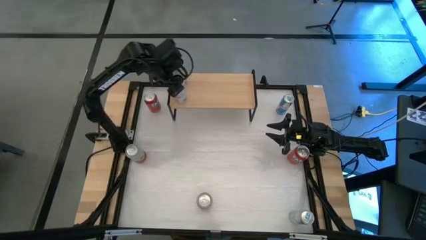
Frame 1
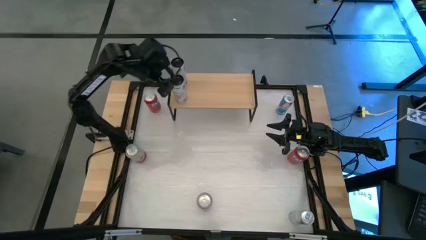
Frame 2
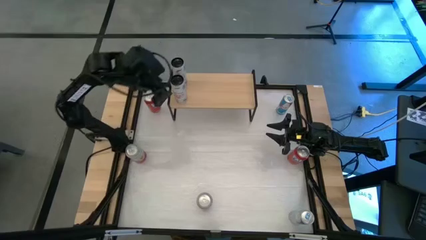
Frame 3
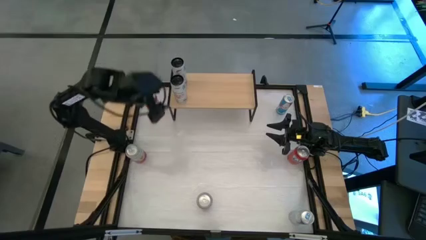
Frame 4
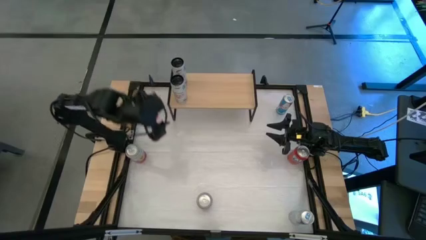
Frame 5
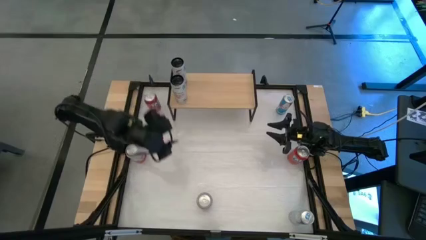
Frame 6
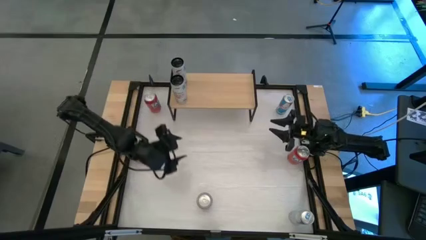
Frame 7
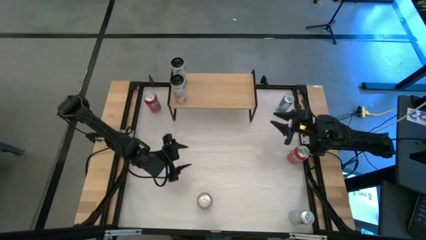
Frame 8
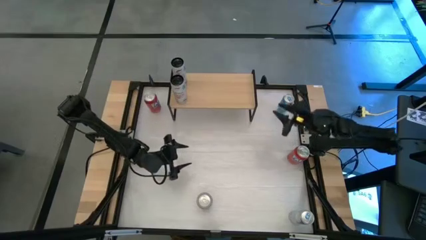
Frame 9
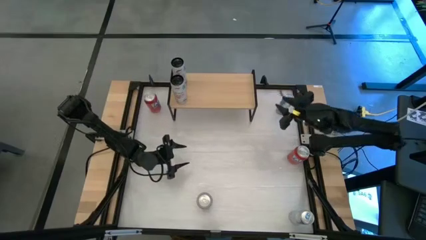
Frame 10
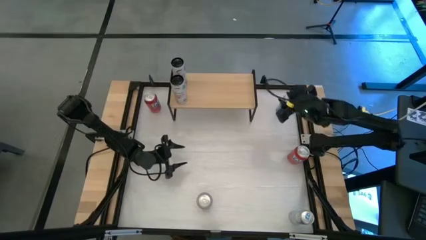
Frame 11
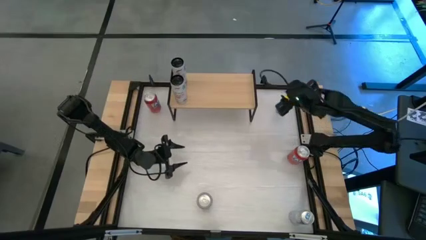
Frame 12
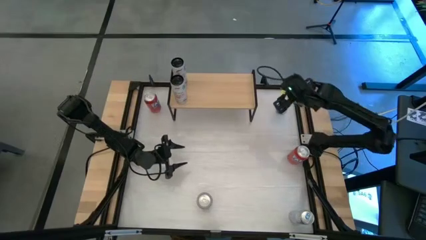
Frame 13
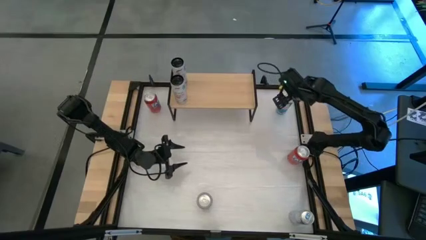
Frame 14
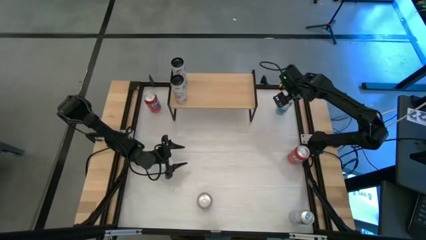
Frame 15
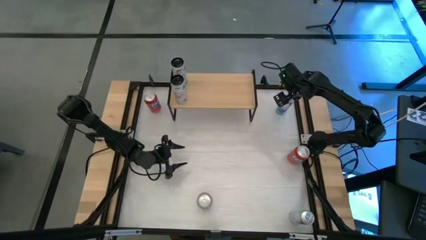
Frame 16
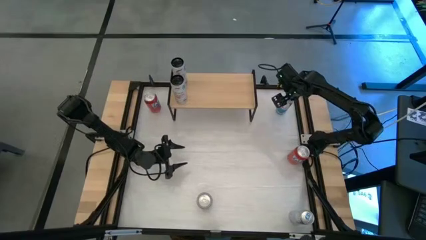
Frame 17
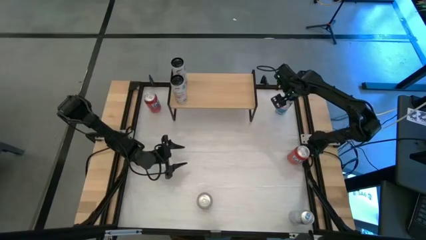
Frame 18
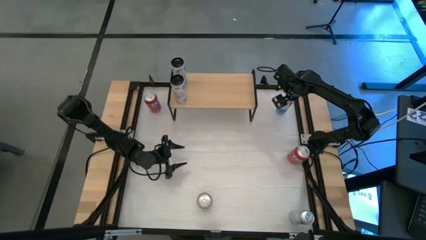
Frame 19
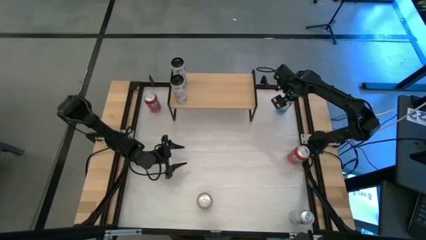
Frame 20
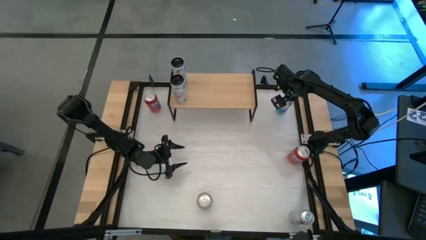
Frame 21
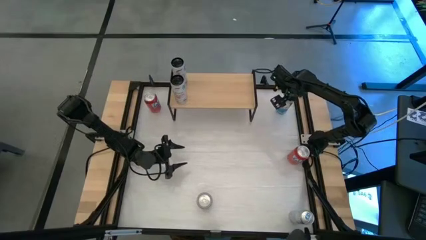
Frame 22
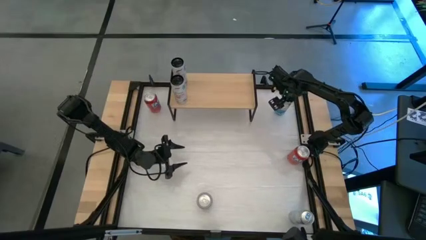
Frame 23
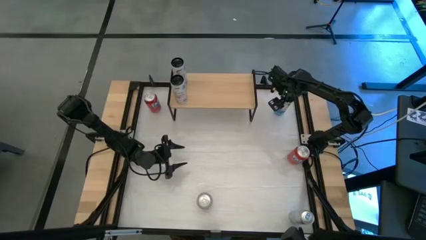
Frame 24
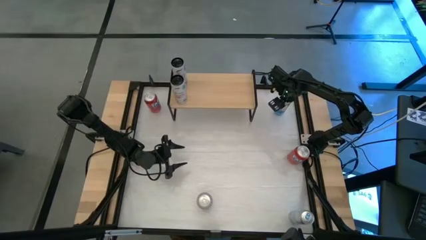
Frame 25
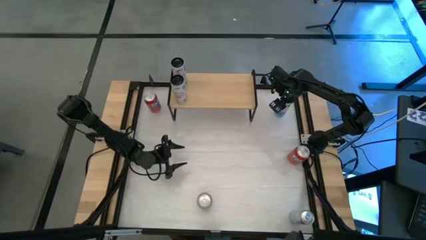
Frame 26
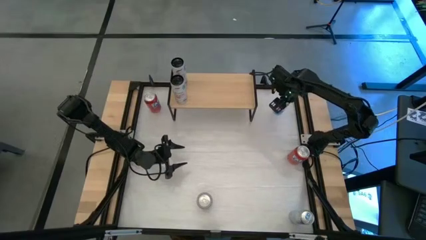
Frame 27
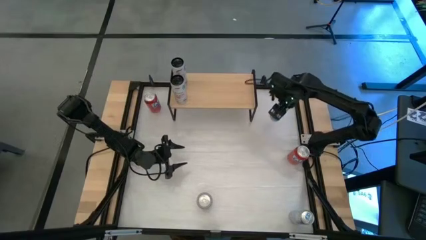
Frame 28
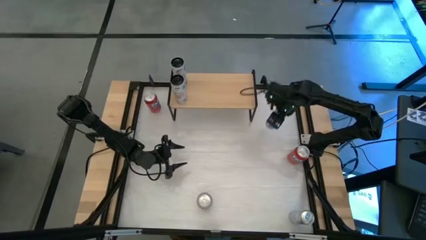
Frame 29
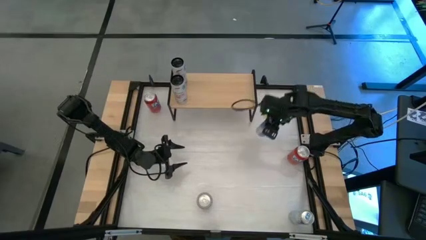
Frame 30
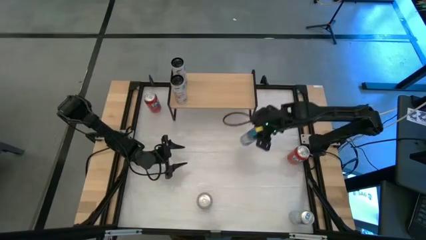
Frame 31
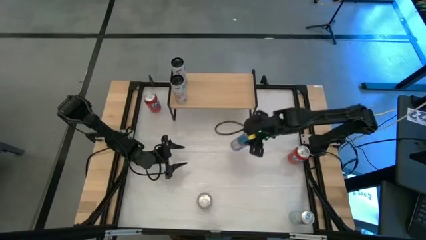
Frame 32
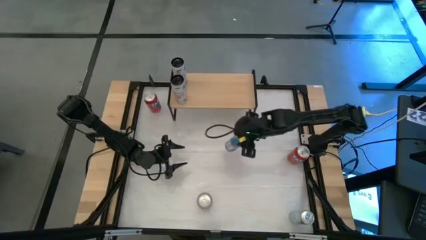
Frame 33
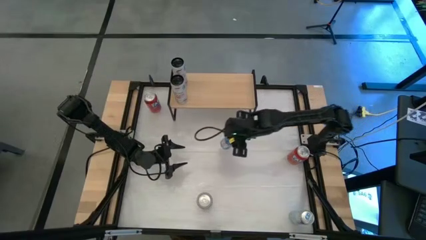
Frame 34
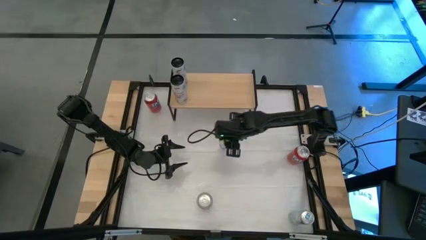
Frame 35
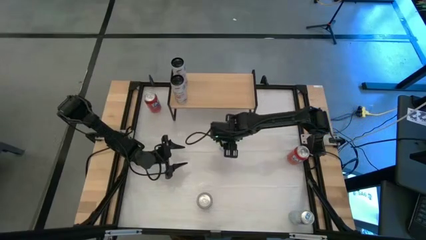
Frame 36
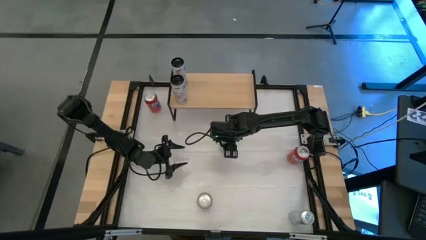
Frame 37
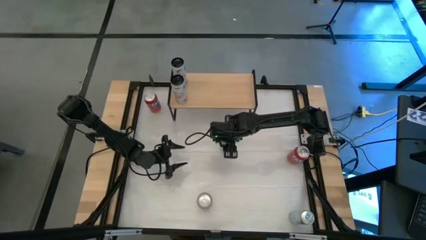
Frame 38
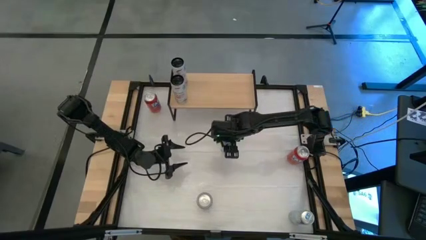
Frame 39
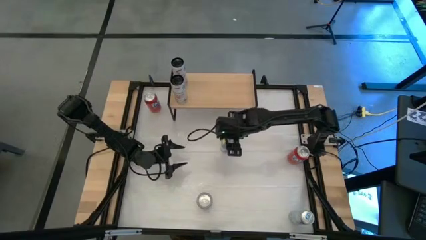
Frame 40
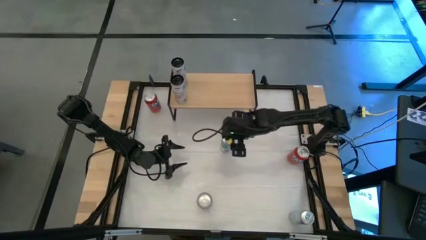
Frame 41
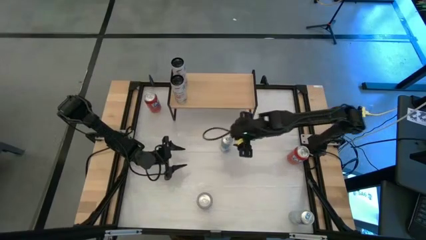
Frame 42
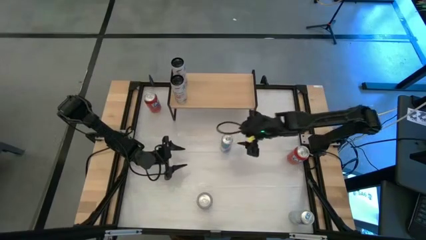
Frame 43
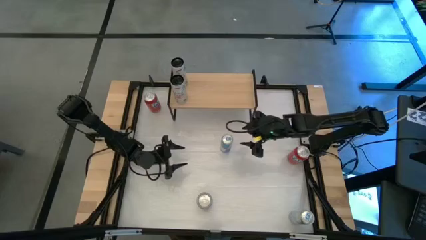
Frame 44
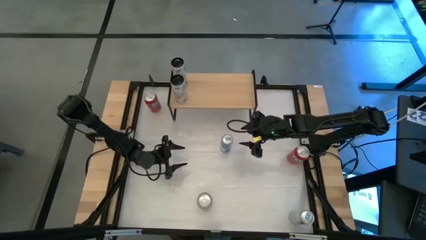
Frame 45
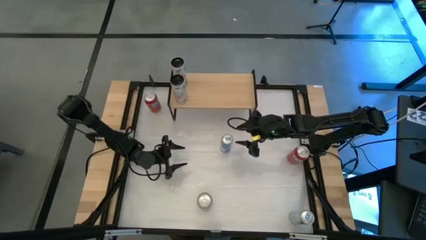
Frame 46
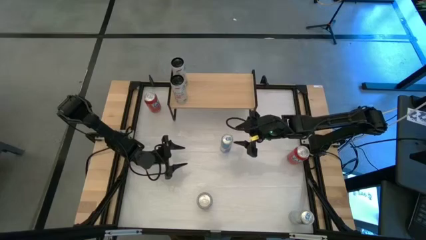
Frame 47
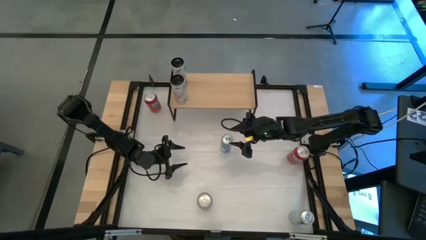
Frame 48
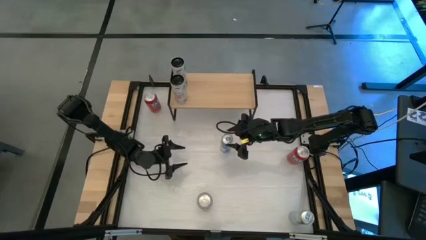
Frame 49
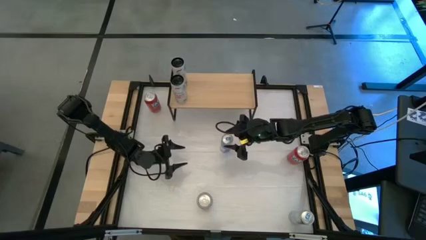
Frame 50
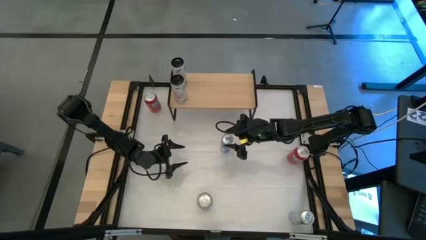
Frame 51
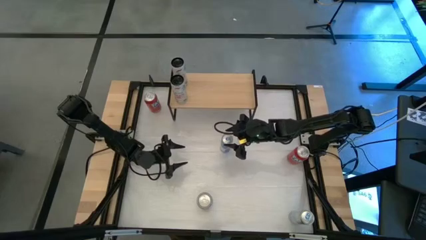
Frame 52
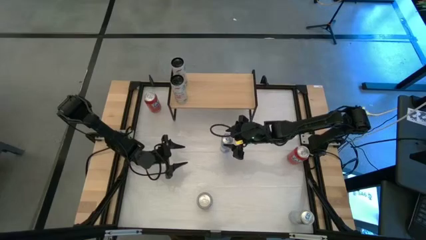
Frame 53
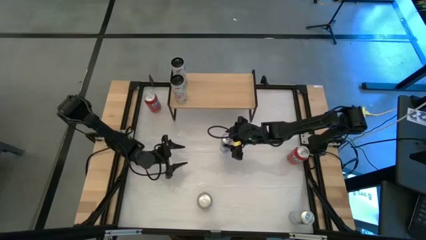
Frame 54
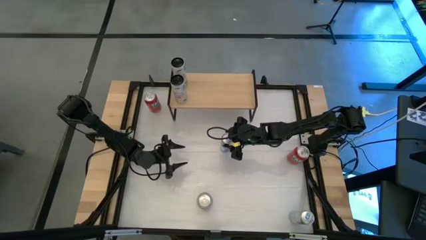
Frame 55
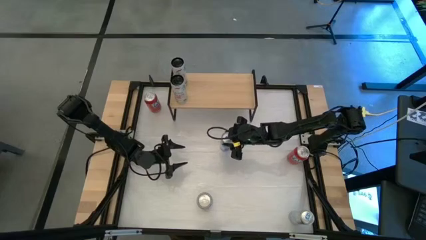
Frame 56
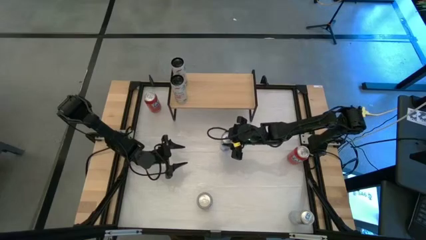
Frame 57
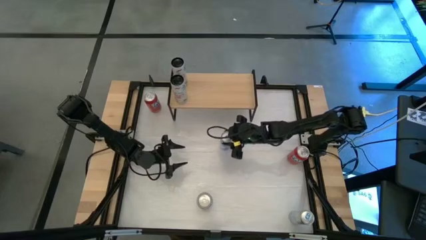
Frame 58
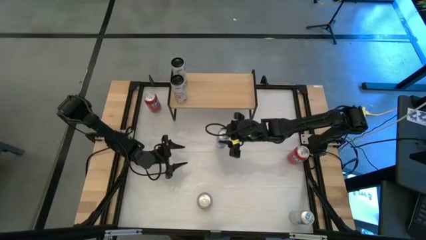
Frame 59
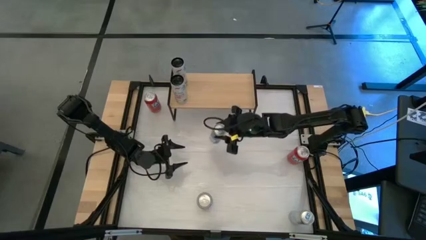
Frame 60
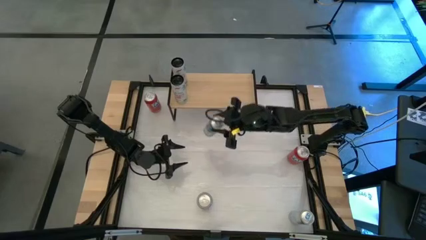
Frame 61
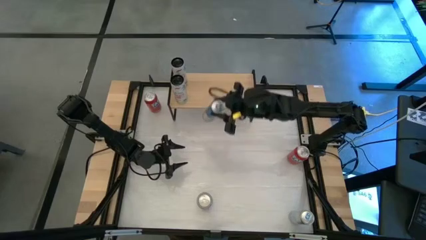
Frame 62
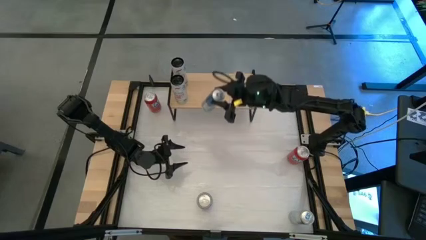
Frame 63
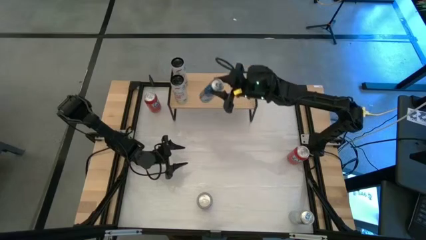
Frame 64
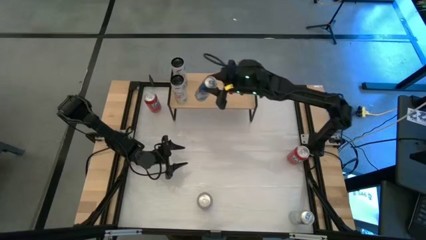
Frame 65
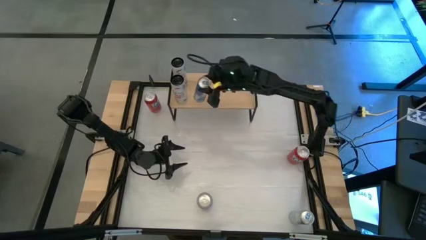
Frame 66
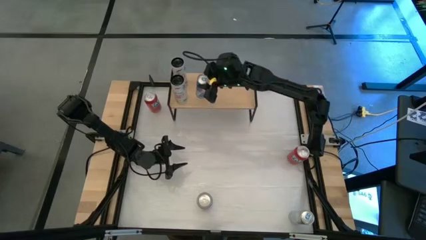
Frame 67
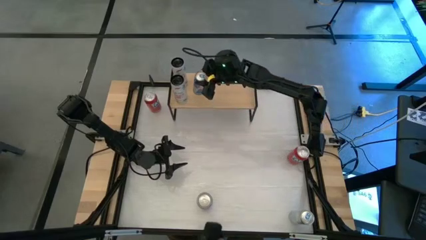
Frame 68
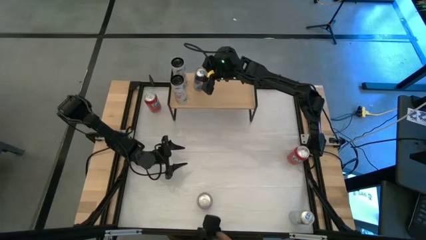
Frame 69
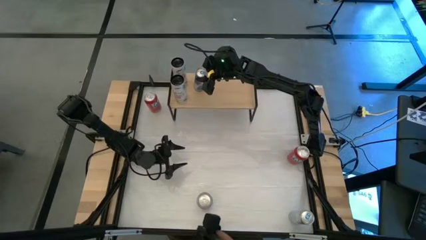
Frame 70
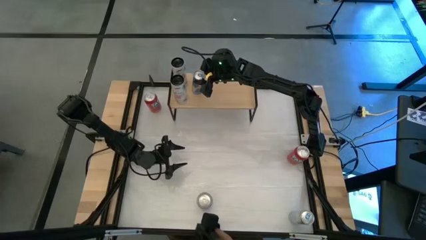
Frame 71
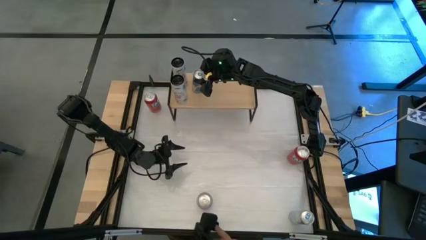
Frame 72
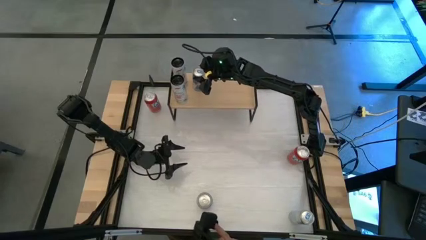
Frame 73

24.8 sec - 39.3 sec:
Task: Place canned beverage on shelf
Put the top blue soda can on the shelf
